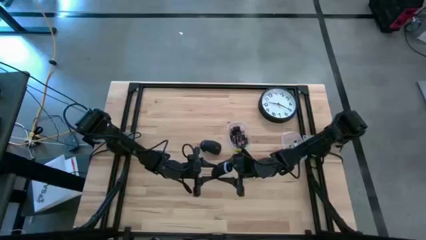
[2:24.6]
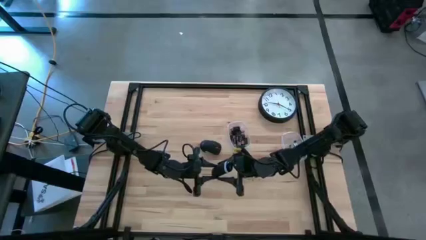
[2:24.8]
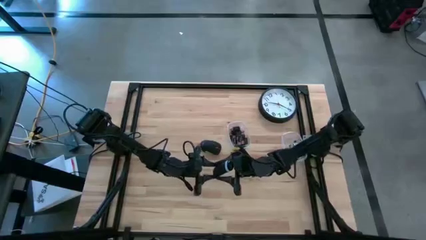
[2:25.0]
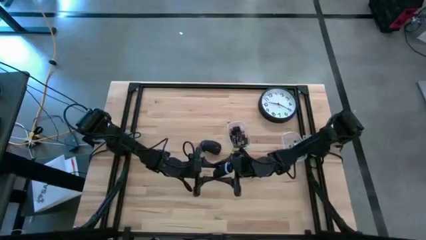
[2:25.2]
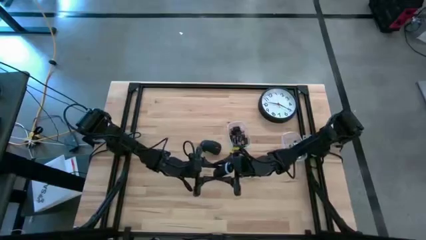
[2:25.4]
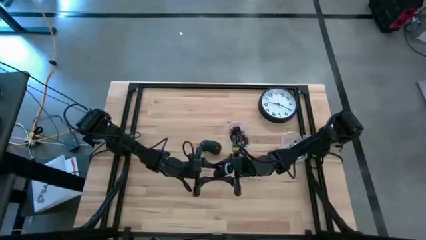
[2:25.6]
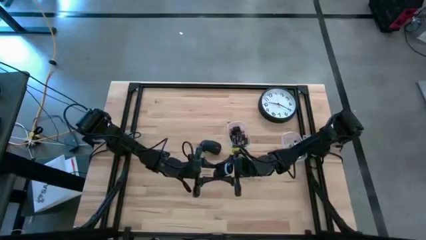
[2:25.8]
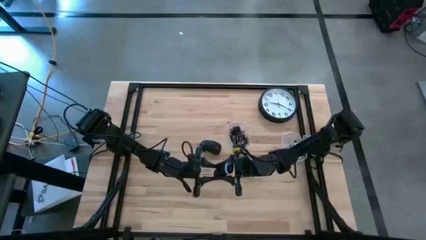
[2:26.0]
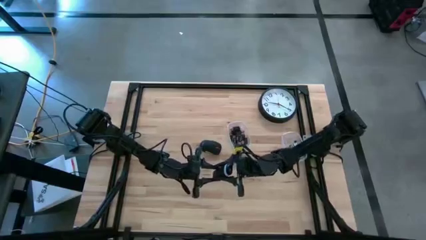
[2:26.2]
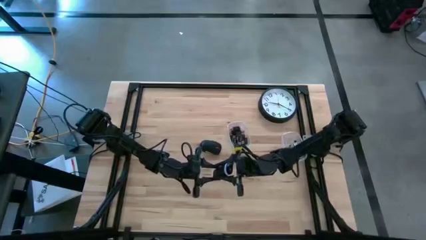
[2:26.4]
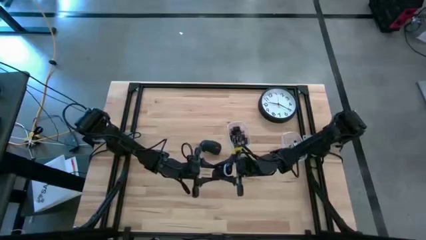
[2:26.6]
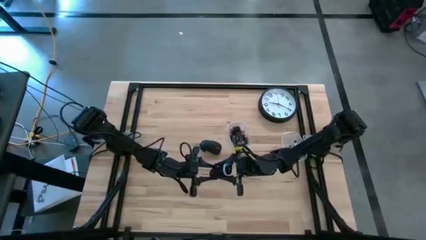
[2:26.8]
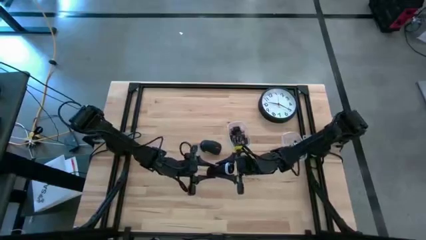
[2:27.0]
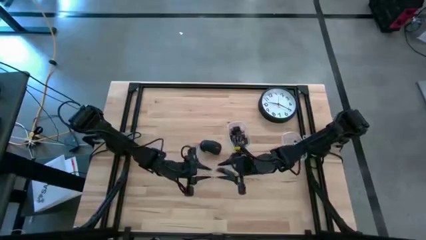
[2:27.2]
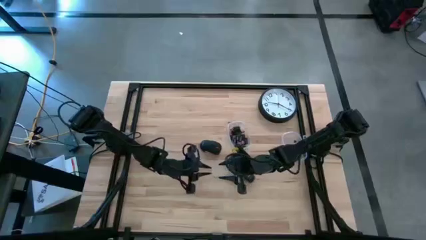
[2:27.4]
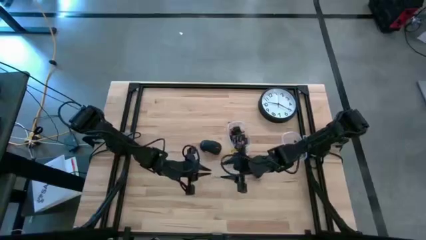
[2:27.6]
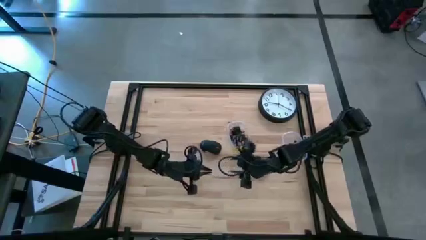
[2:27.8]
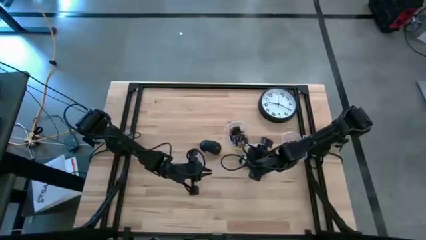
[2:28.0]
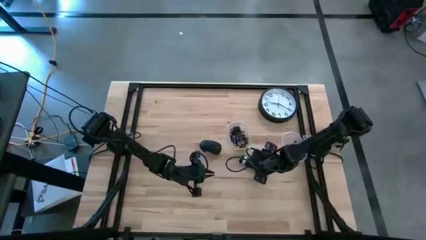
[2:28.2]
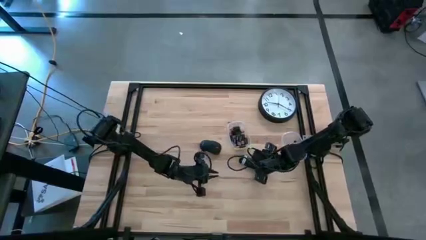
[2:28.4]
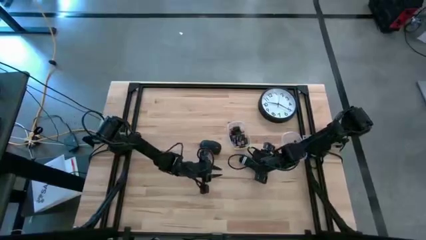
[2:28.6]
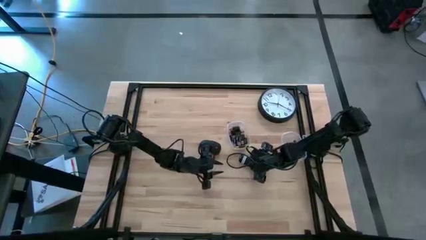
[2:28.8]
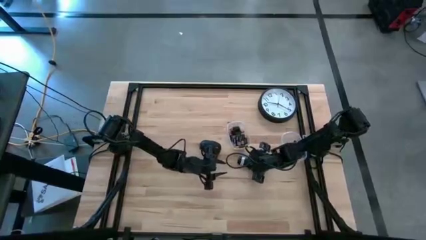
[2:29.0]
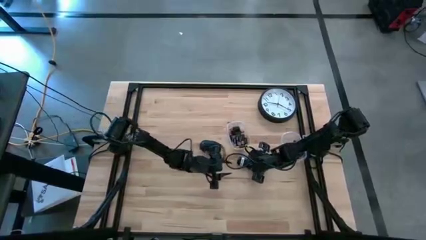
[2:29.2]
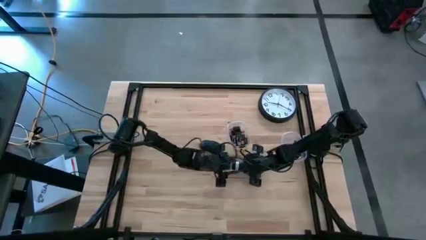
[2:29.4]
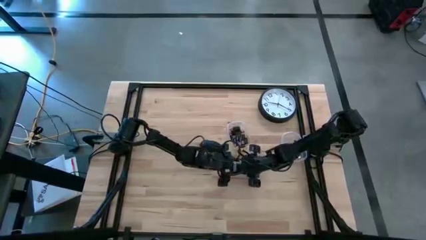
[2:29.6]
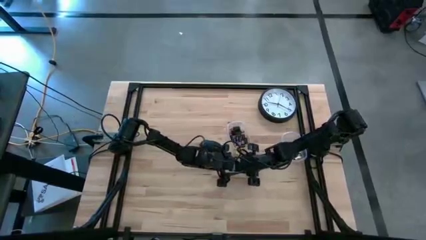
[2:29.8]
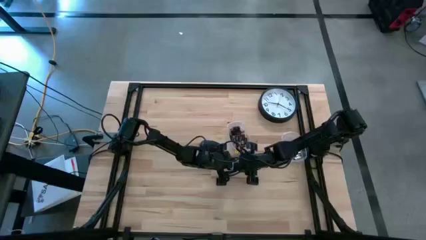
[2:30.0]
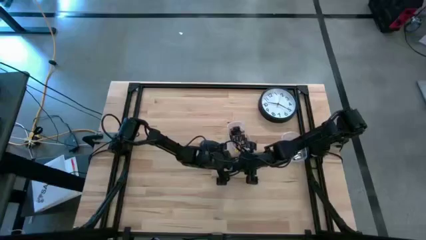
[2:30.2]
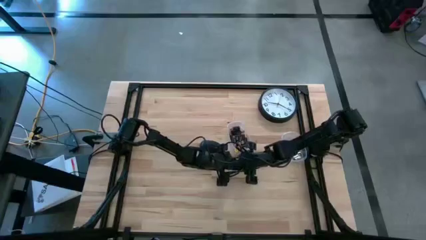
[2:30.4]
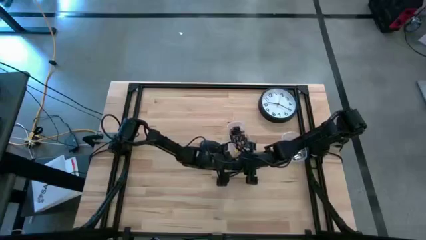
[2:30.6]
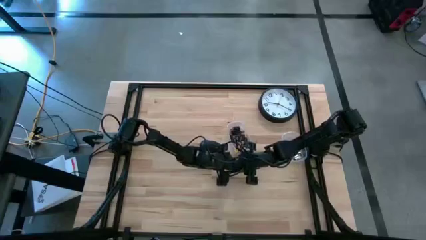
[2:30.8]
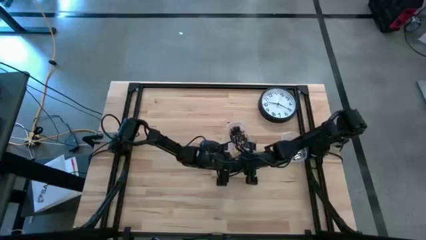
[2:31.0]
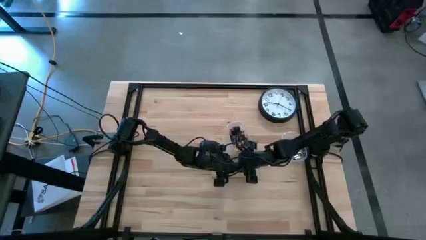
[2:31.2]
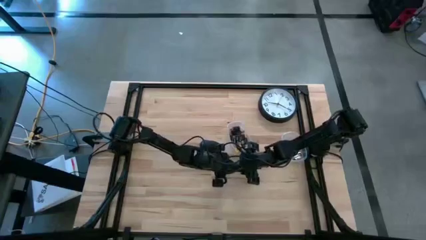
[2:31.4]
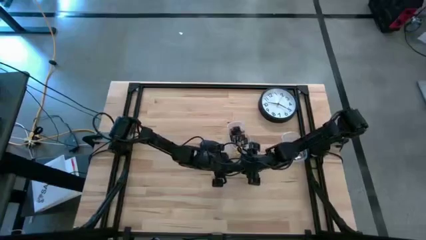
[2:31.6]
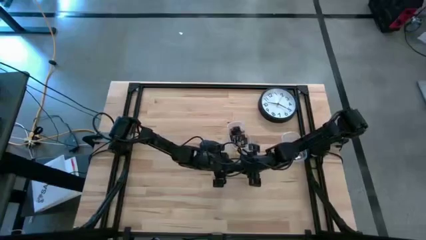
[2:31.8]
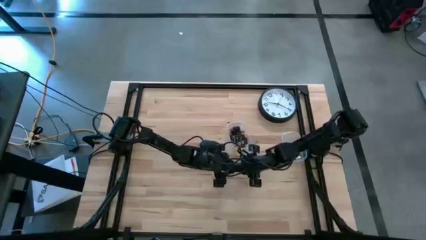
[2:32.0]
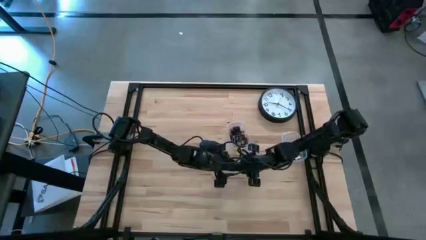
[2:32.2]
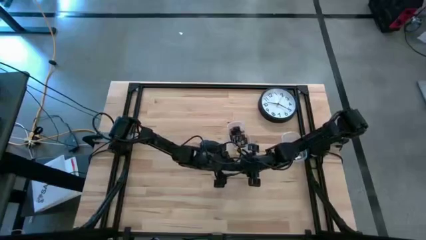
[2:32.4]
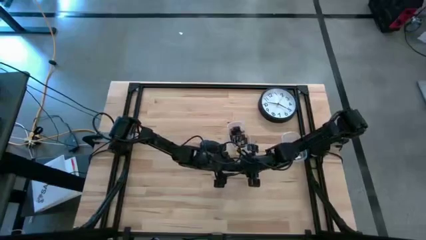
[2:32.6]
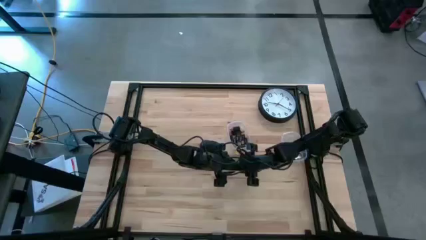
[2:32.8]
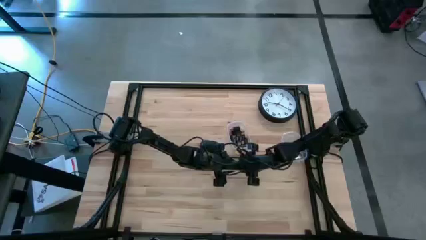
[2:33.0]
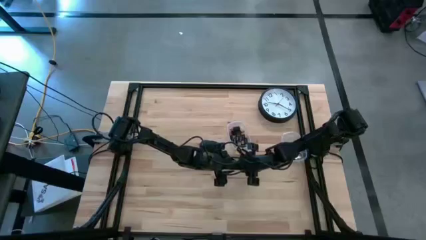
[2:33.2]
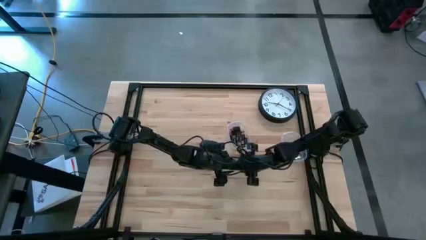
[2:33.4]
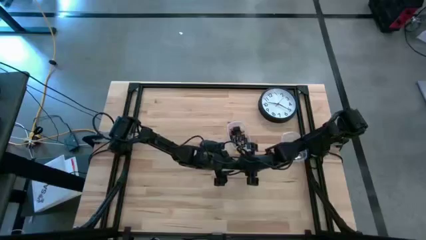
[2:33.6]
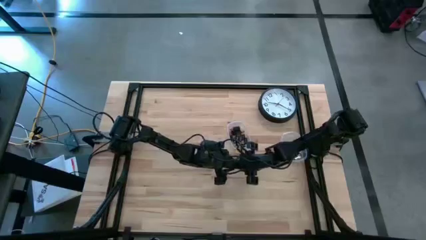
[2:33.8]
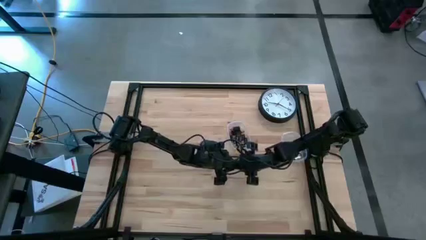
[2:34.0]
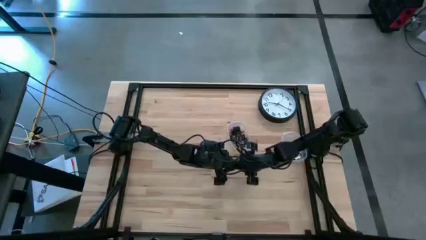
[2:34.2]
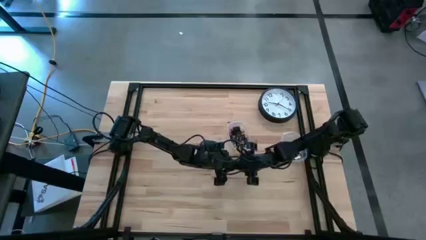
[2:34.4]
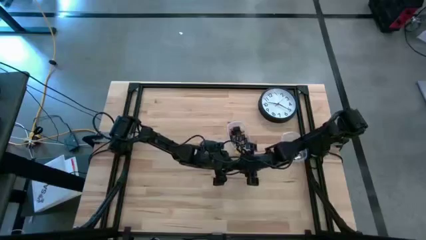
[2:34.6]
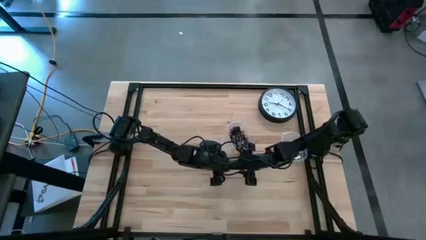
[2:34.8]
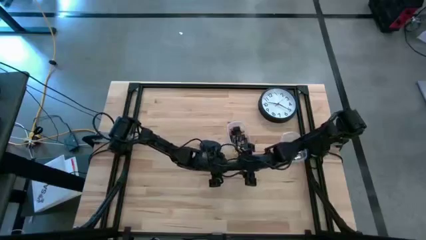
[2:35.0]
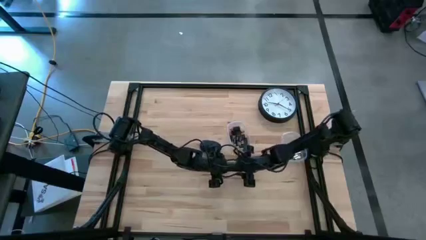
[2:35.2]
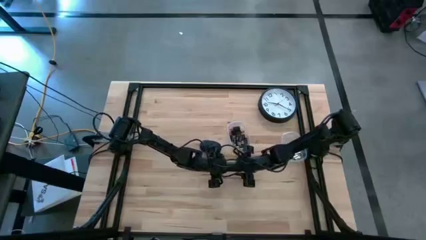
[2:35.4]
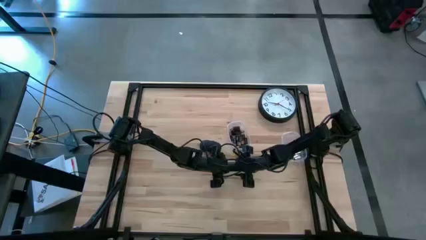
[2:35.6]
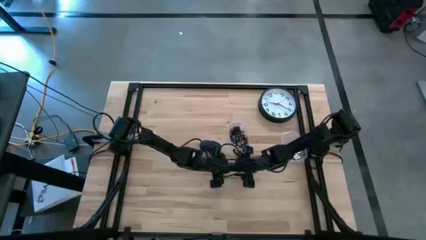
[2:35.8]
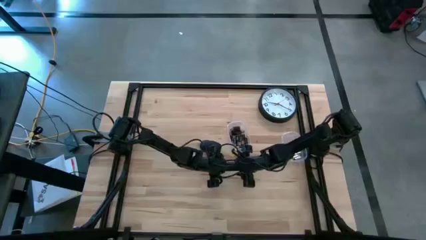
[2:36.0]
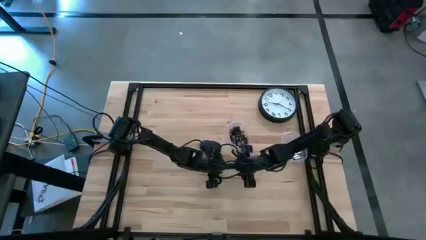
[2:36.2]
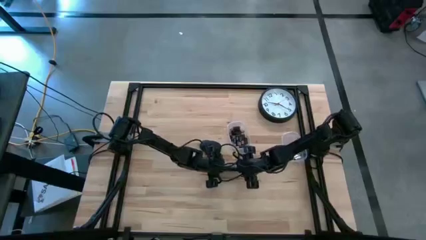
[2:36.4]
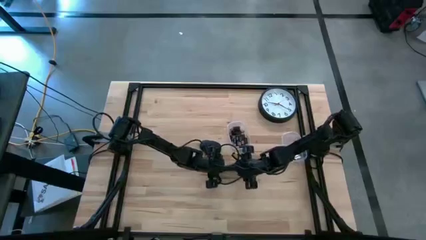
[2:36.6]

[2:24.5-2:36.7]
Task: Insert battery
Remove the black cover of the remote

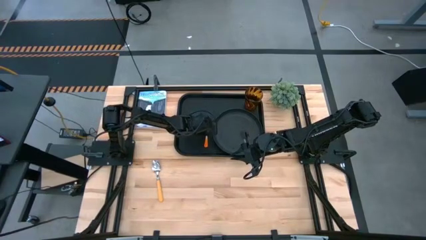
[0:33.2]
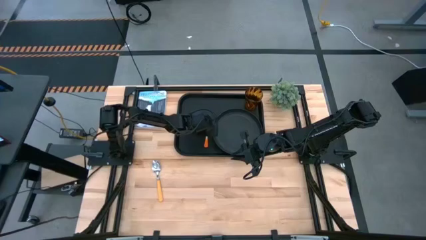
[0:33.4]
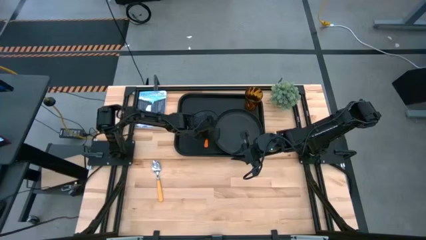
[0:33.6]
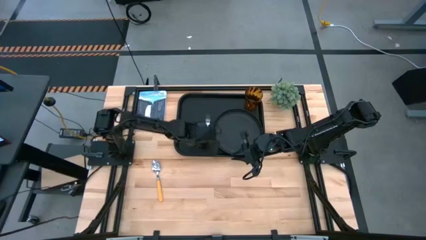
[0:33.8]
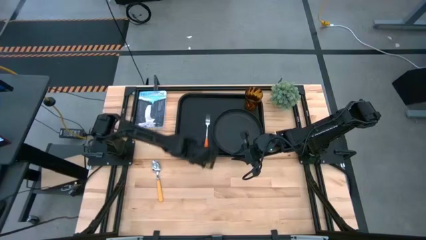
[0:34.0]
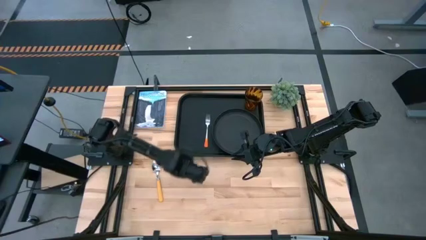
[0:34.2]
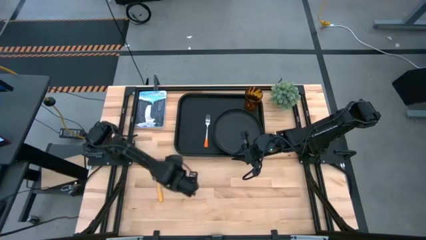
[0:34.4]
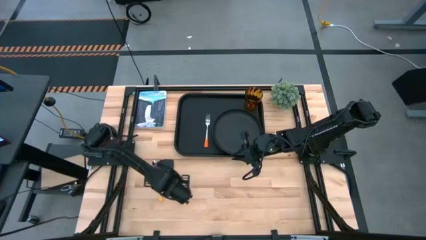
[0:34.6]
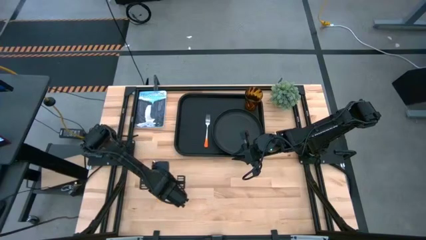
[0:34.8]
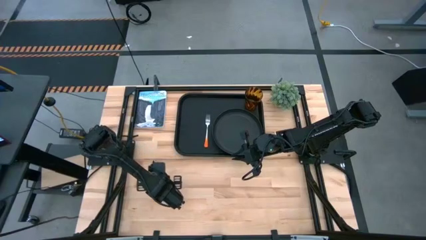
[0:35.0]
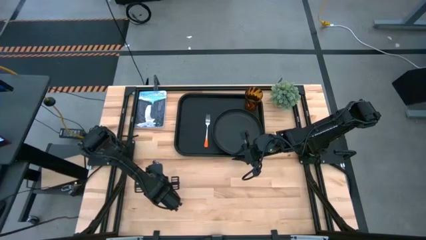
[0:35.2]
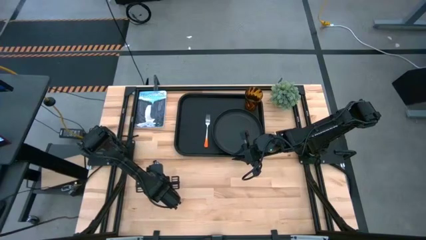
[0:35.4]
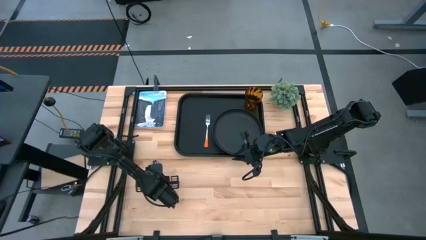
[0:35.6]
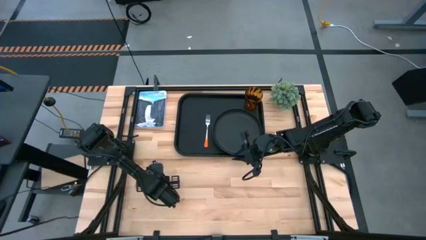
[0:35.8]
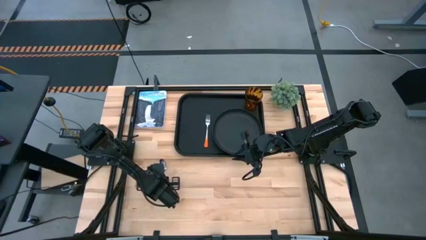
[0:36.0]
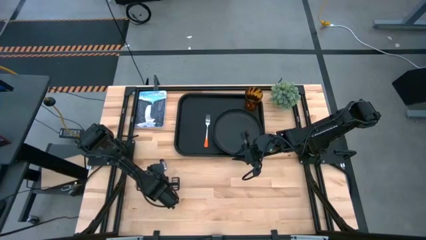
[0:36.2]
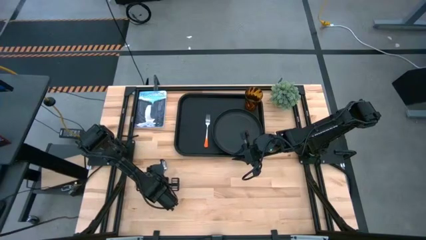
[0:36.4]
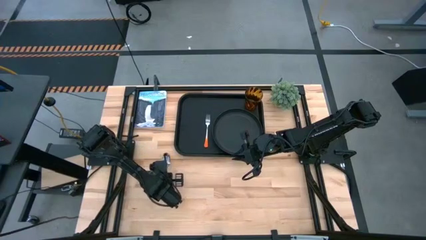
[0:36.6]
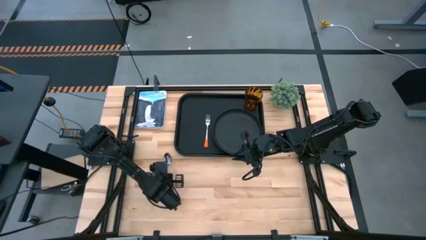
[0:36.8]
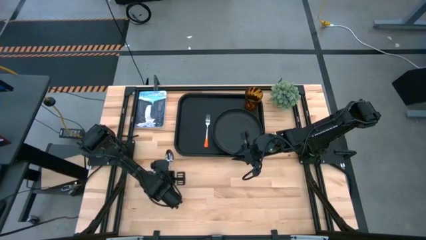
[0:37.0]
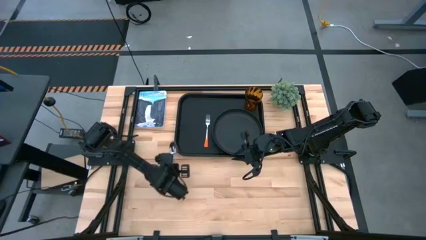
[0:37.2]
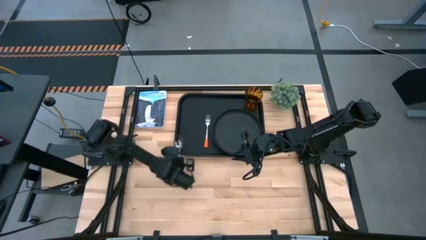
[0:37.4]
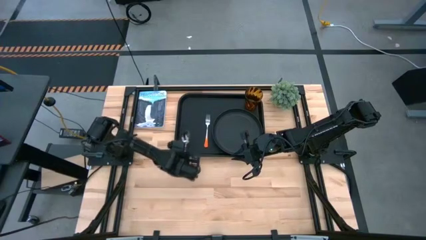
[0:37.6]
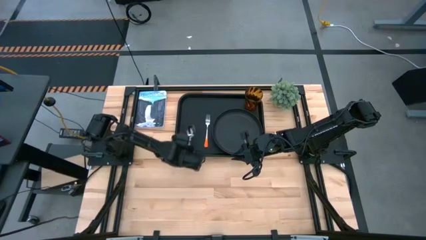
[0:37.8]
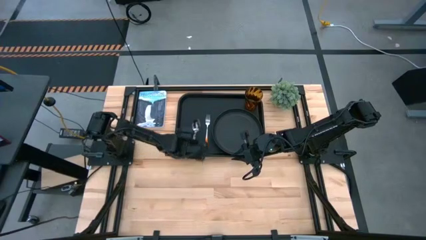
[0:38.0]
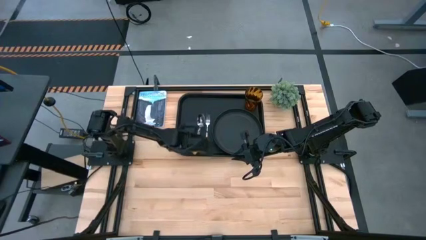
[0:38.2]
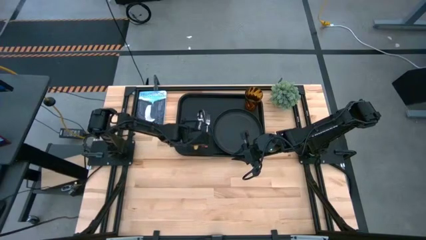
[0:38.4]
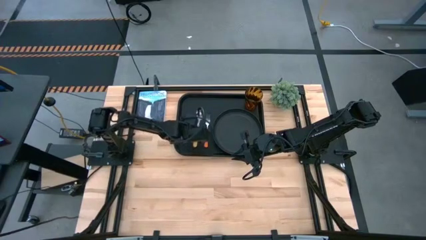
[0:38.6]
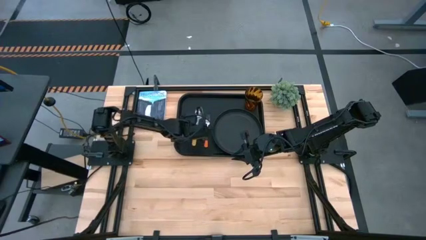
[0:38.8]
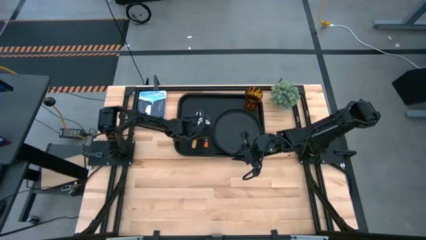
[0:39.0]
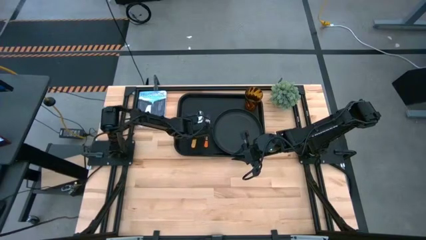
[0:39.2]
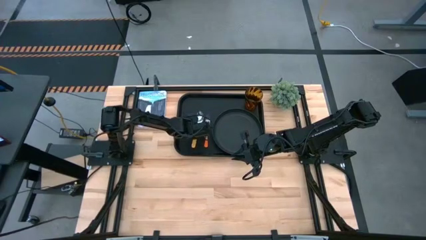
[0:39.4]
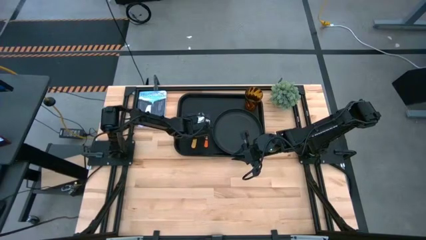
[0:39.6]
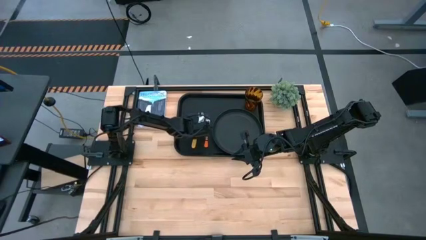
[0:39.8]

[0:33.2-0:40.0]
Task: Pick and place plate/cup/fork/spoon on tray
Put the yellow spoon on the black tray to the left of the yellow spoon
